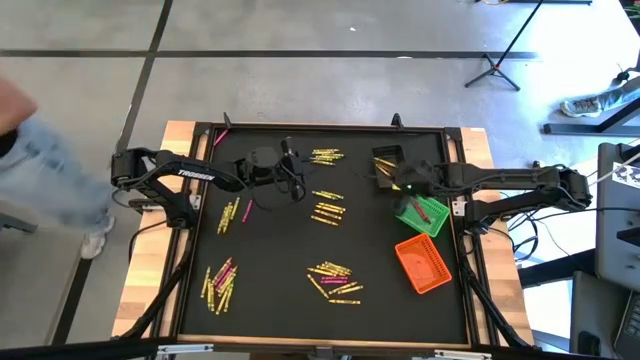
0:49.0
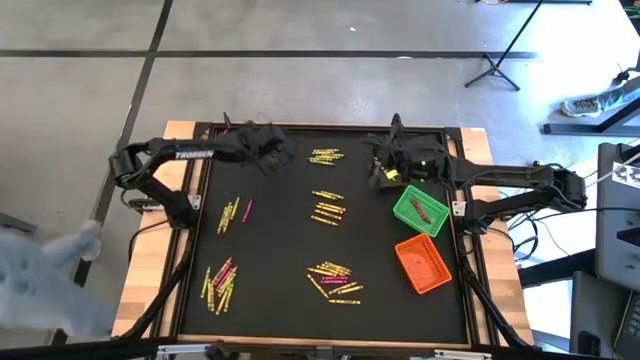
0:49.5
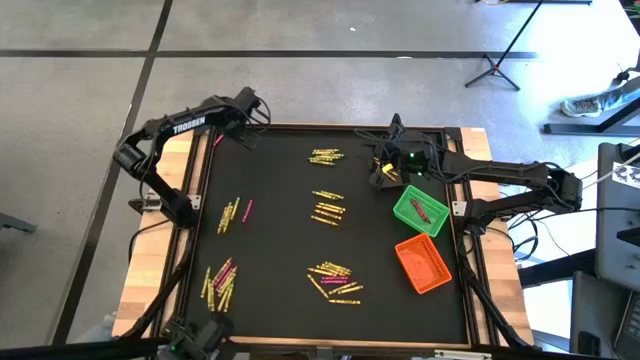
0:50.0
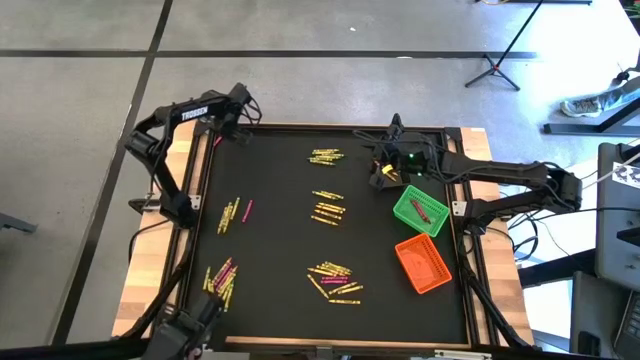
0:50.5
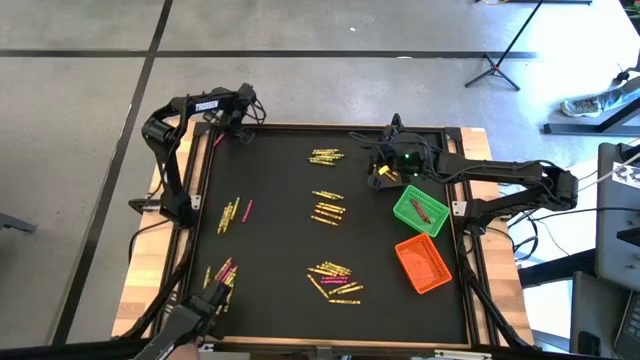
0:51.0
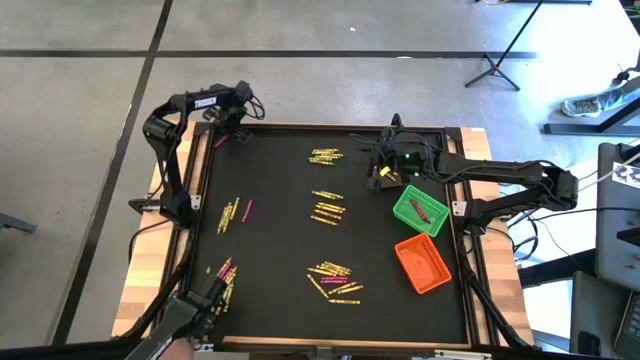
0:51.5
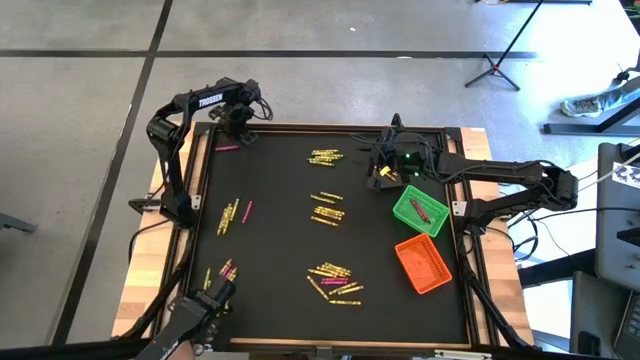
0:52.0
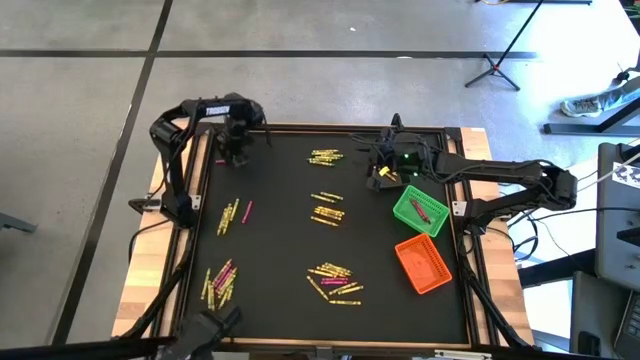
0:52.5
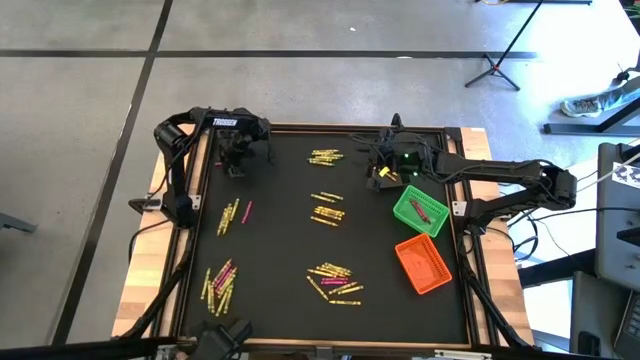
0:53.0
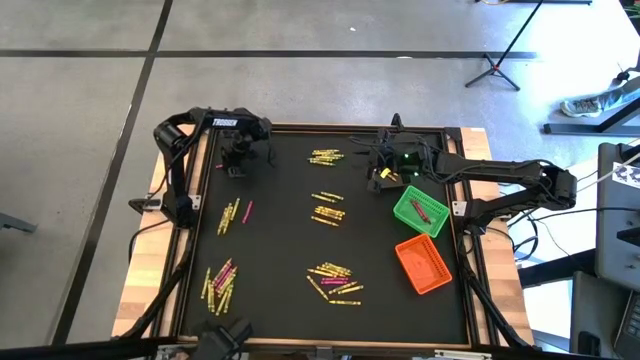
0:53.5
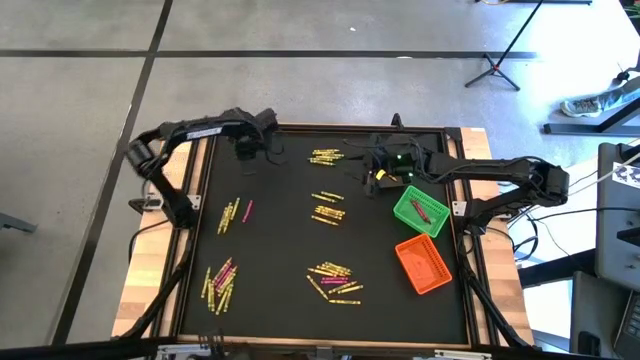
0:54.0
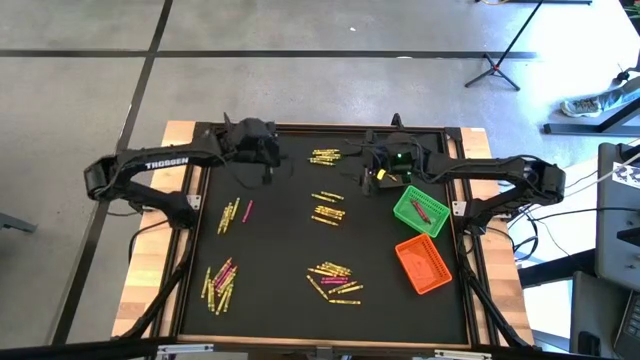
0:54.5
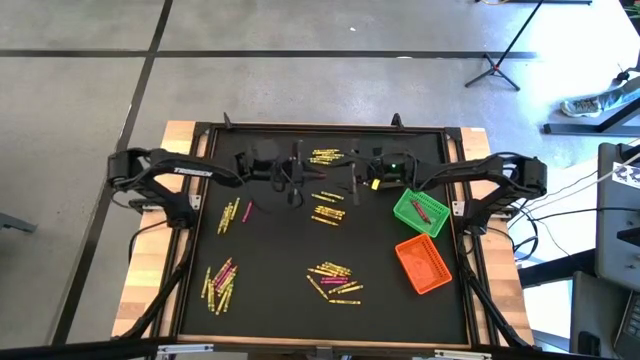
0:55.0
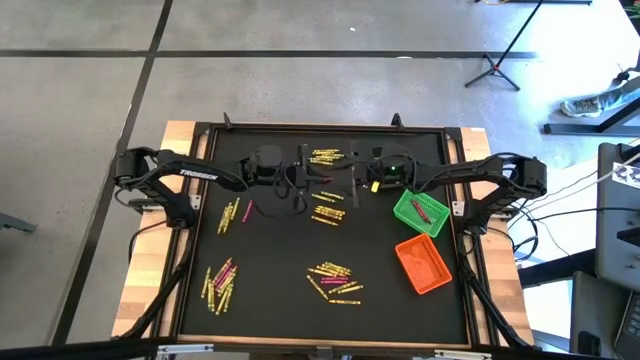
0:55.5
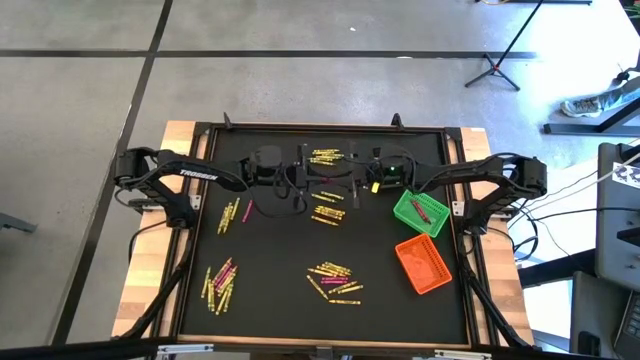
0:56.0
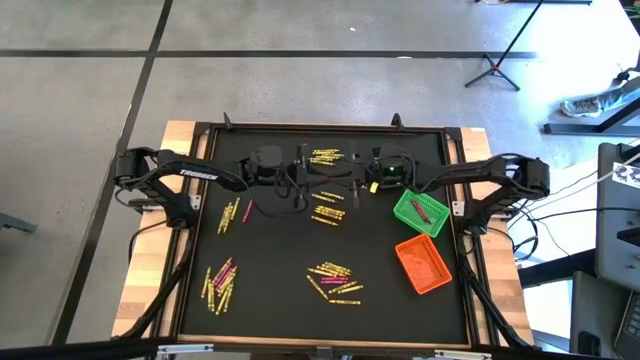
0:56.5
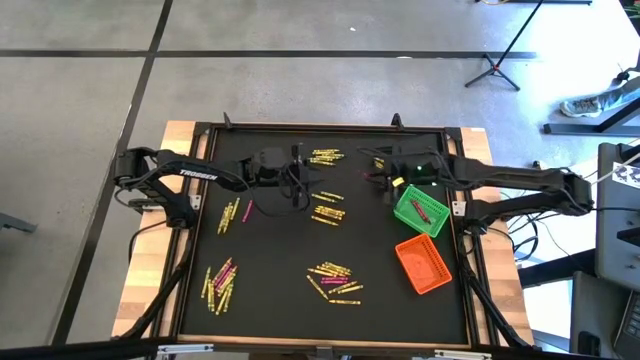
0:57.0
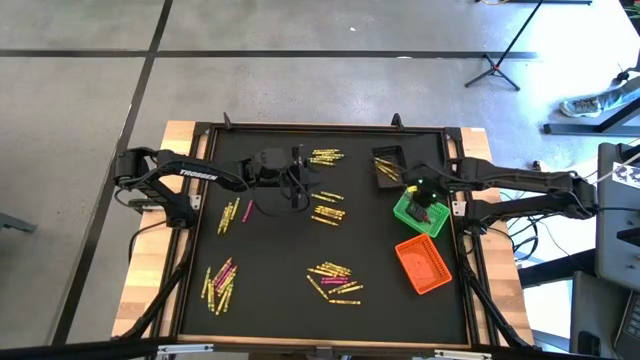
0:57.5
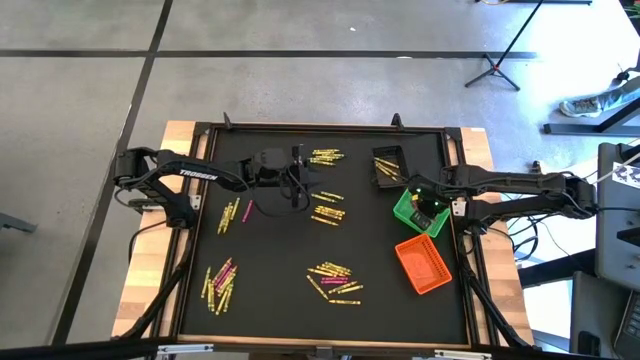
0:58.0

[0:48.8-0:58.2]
Task: Sort crayons
Put the red crayon into the green basket

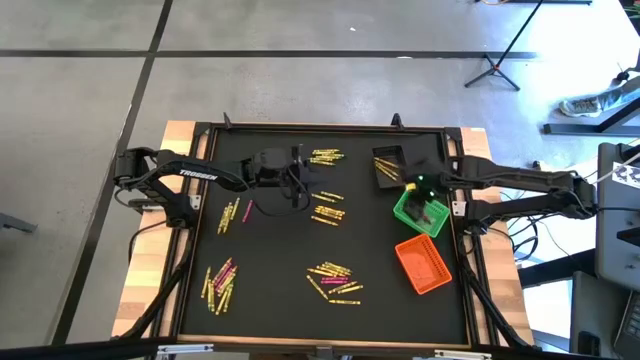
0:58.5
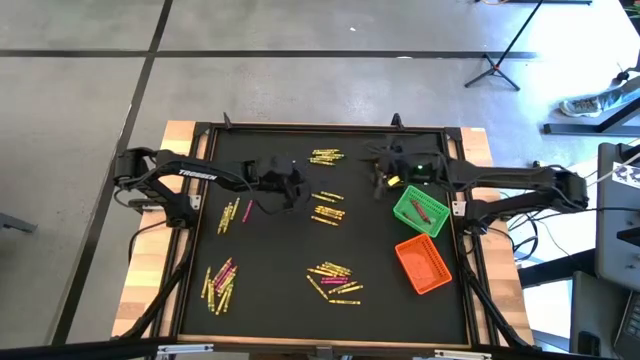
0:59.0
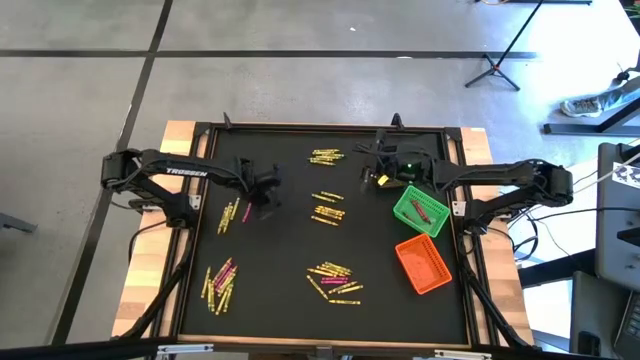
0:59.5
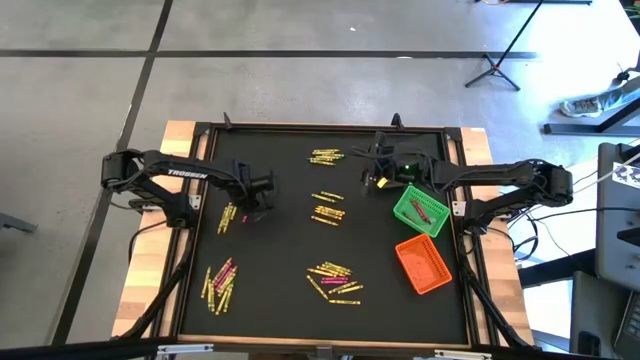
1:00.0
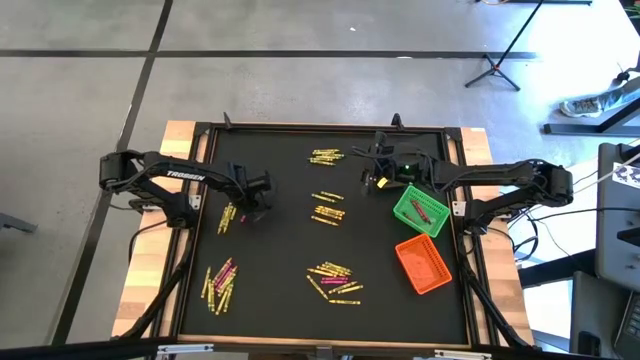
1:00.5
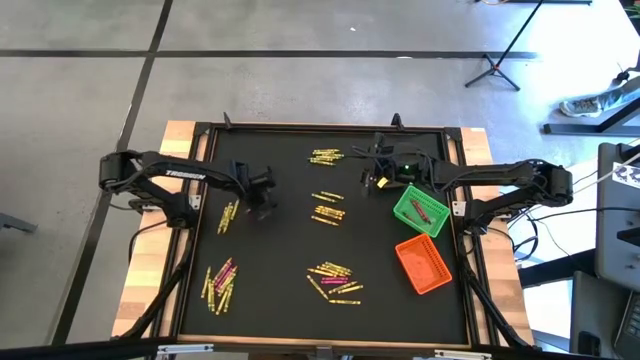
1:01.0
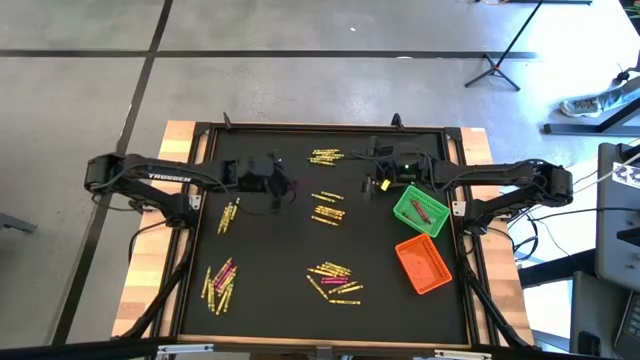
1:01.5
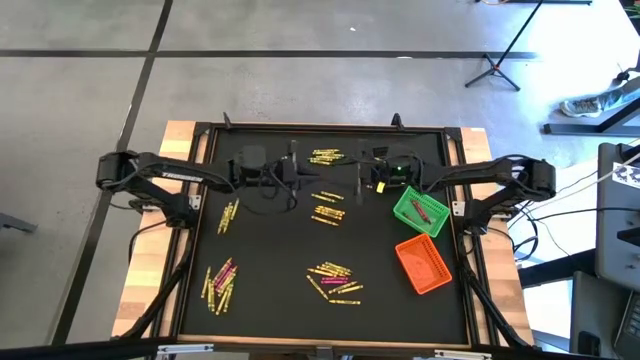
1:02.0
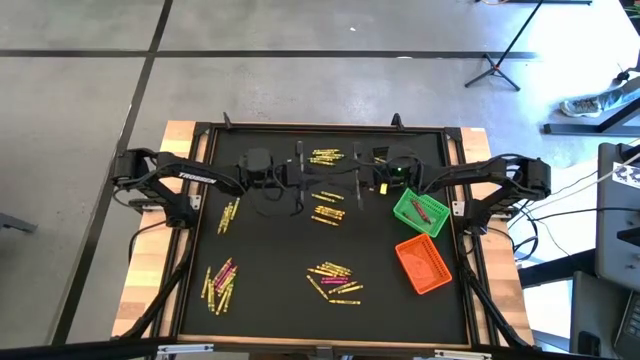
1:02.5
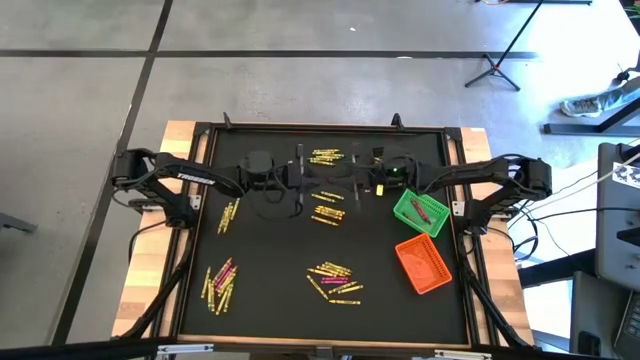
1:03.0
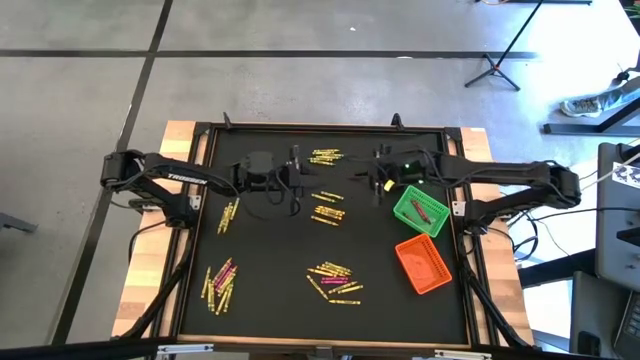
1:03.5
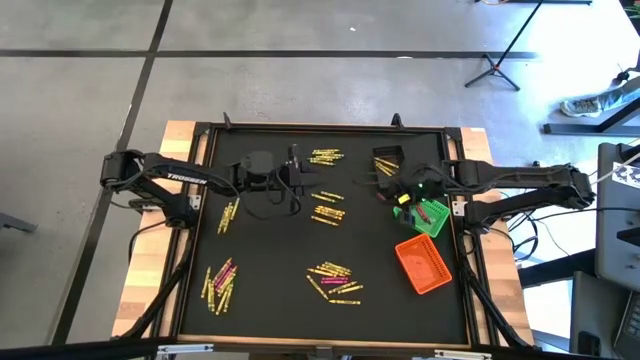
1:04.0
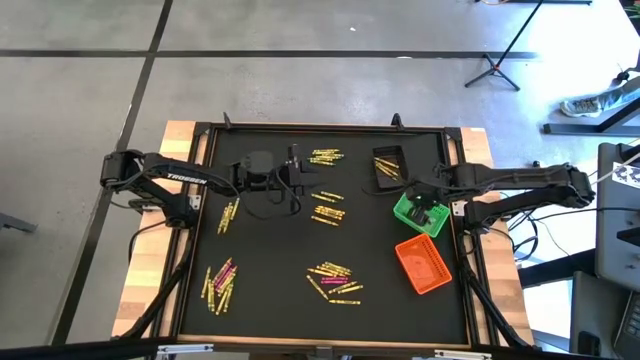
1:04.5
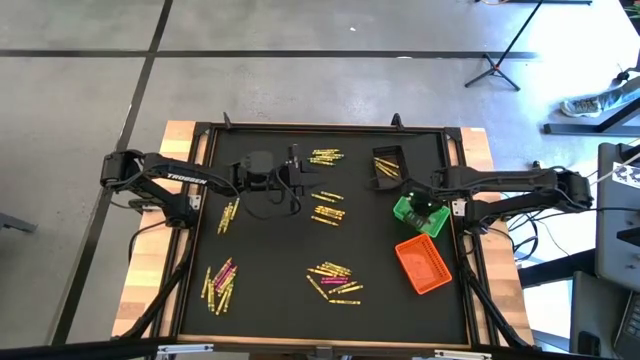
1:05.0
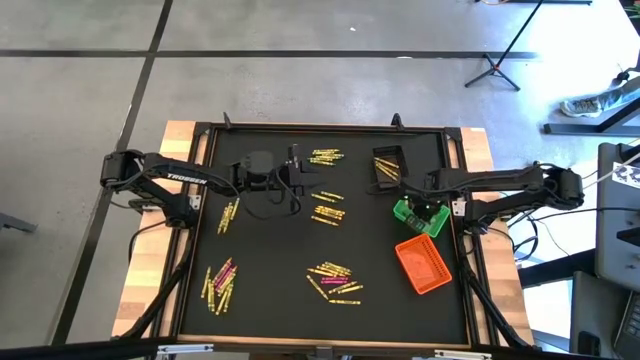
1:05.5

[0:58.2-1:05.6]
Put the red crayon into the green basket

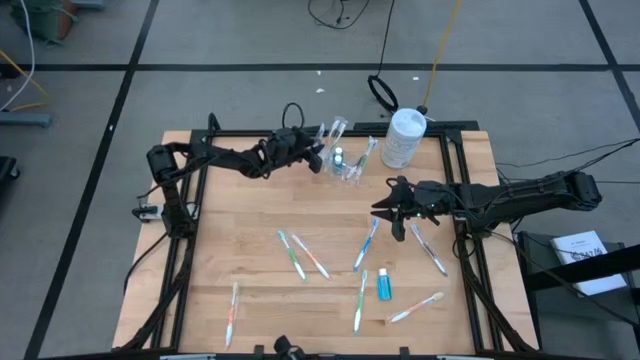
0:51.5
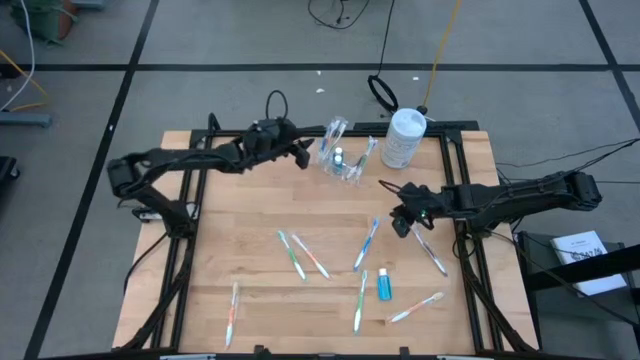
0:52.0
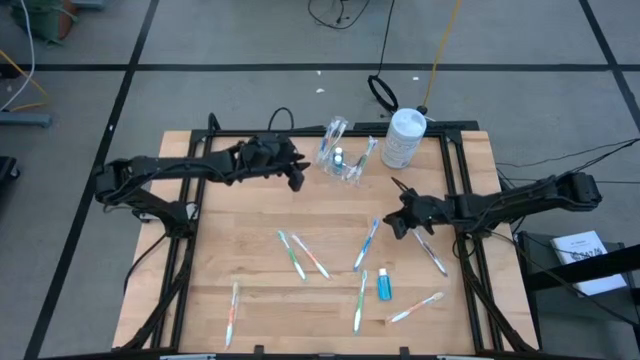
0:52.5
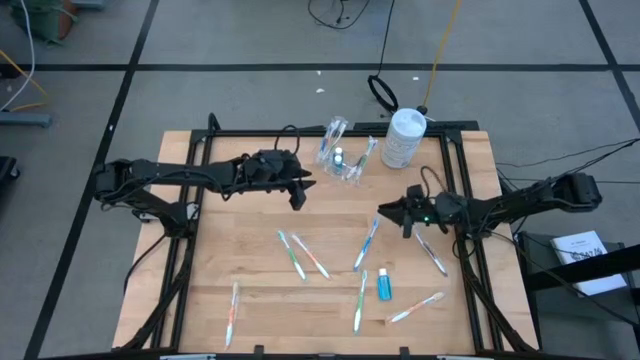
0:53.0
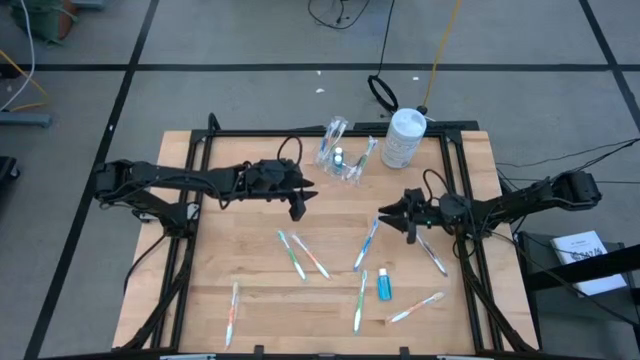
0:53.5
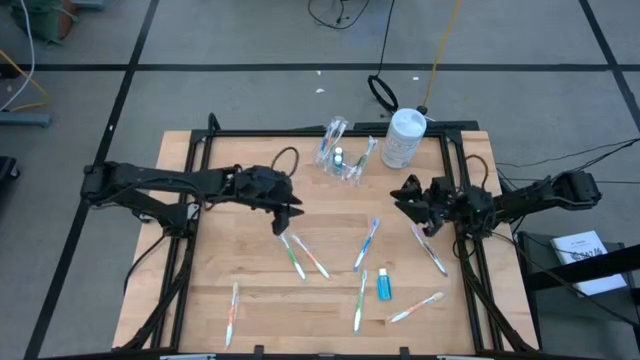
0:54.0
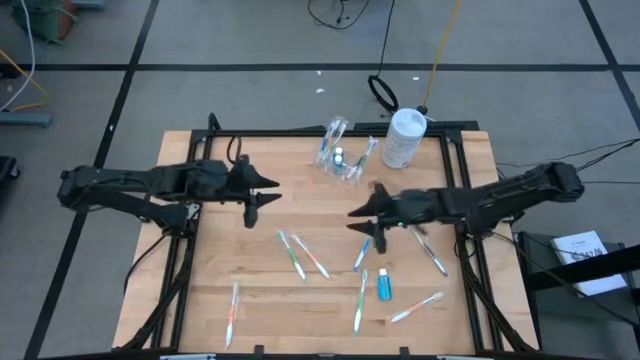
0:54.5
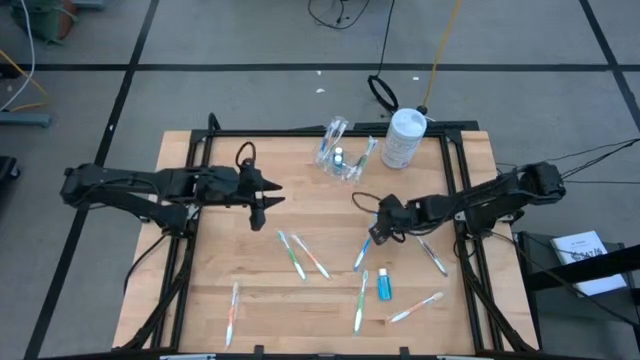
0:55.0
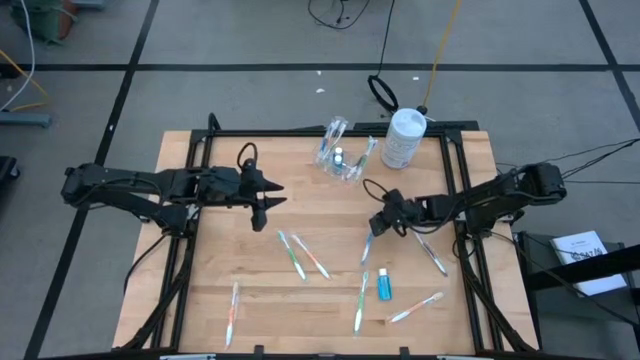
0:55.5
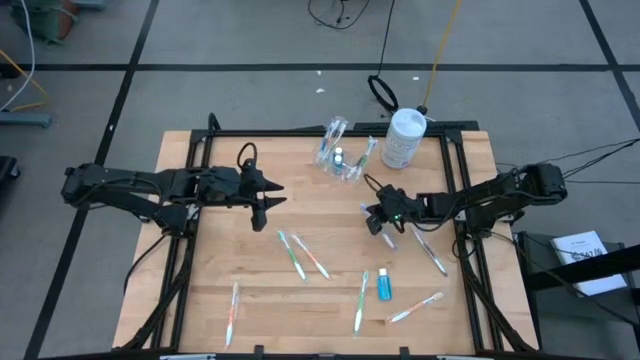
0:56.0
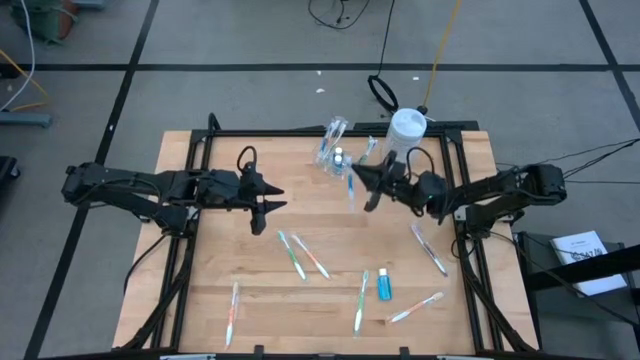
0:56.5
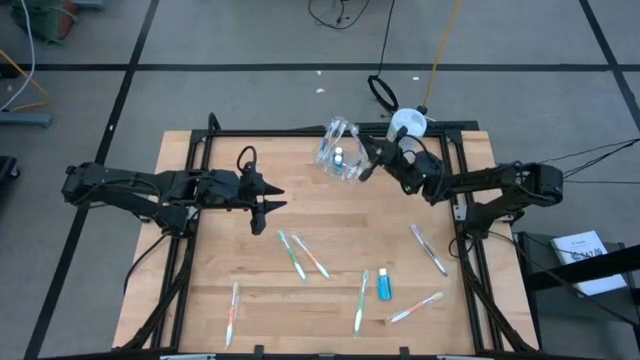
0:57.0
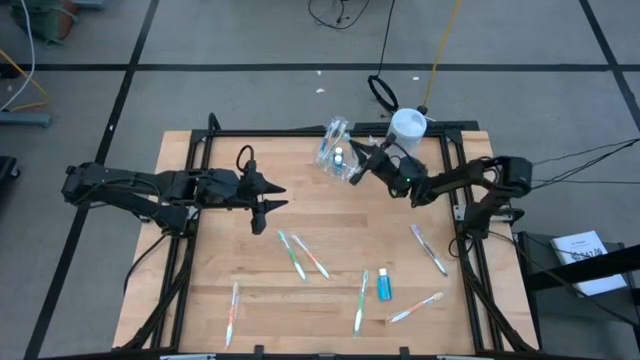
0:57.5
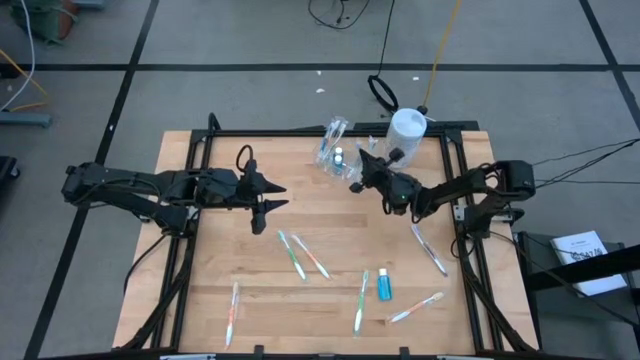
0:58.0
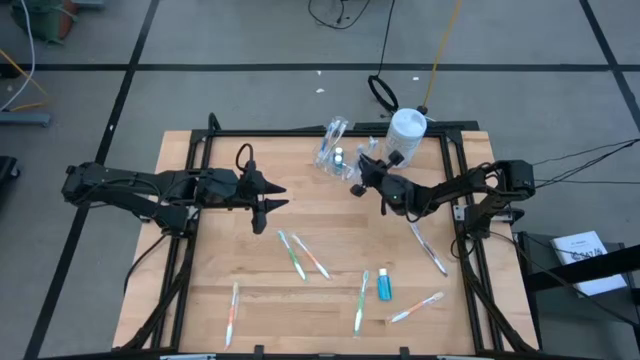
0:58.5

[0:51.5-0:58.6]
Task: Pick & Place toothbrushing station
Put the blue toothbrush into the transparent organizer
